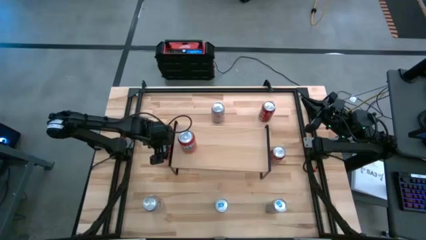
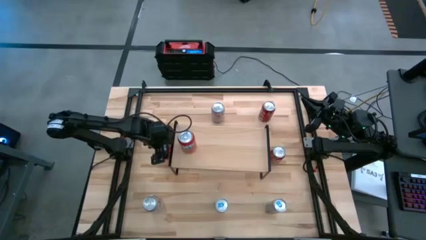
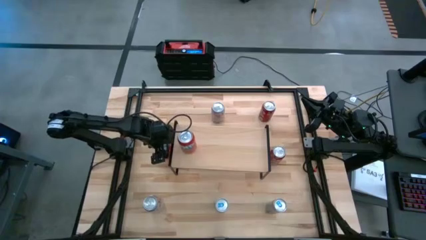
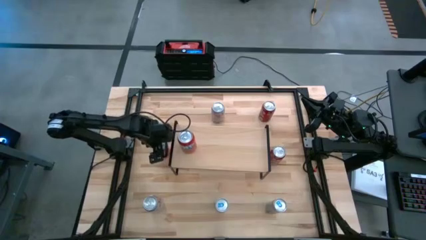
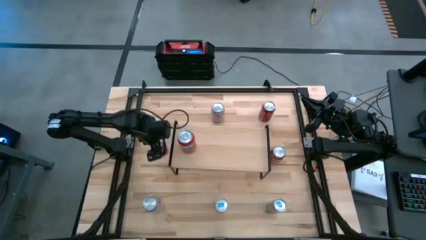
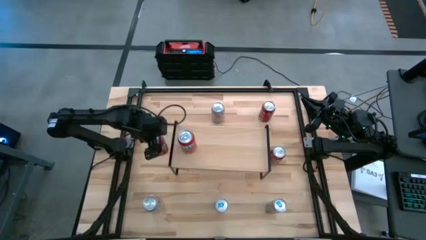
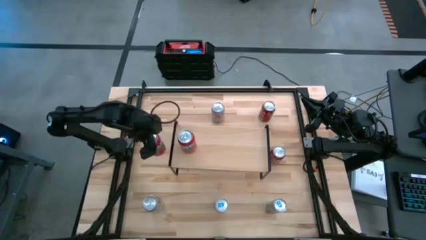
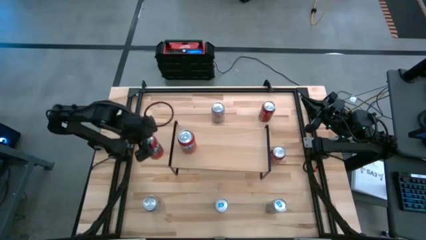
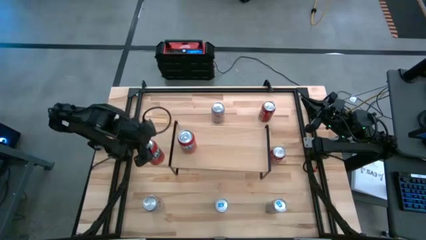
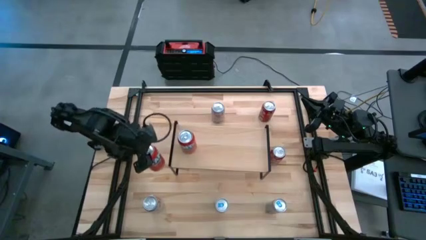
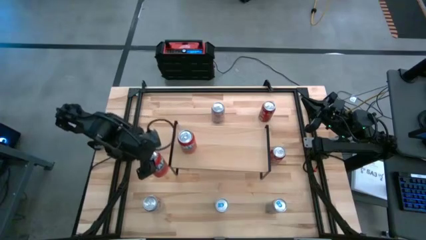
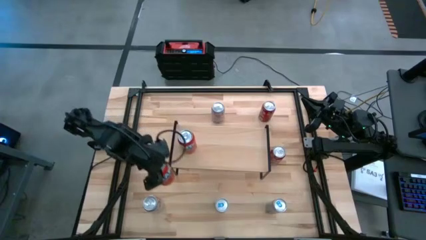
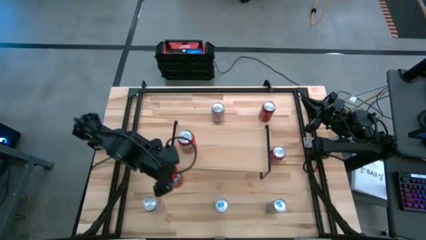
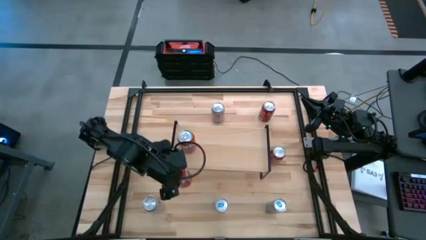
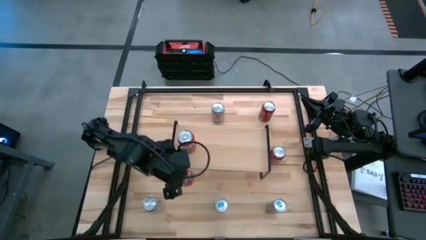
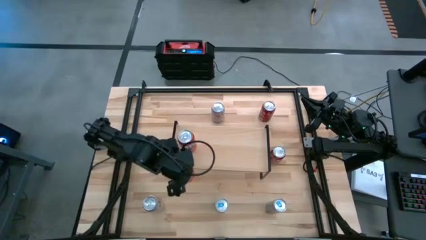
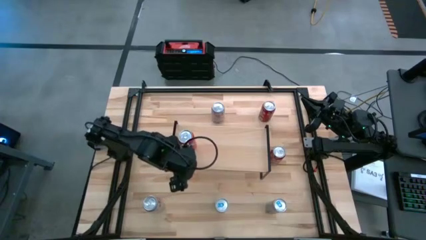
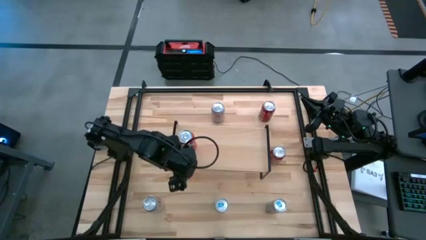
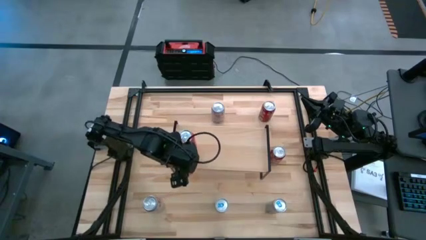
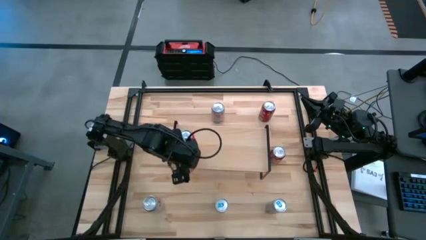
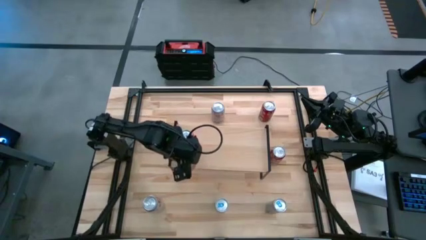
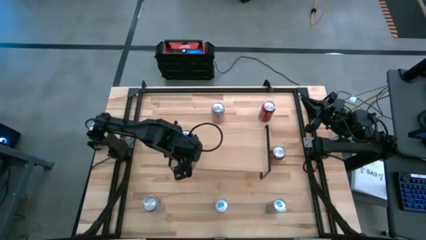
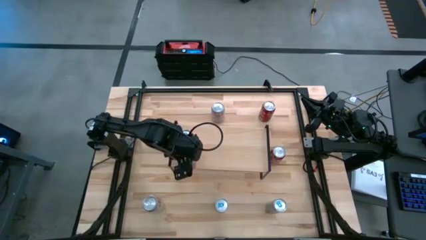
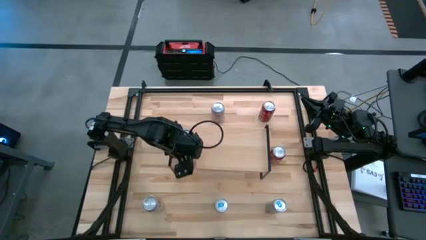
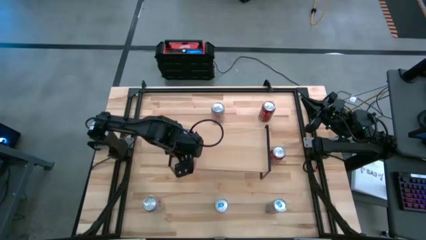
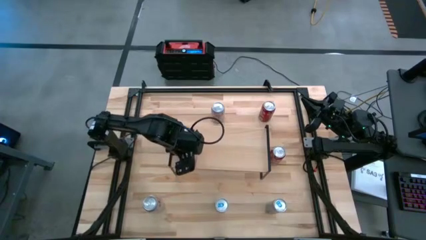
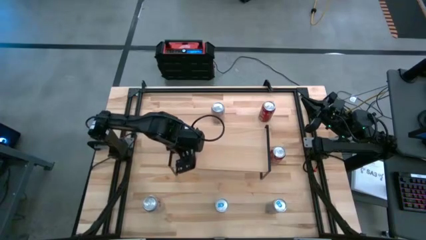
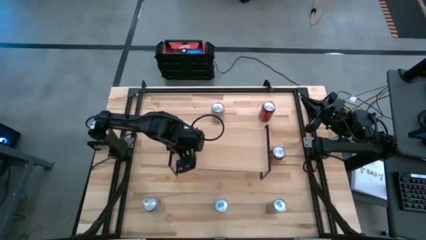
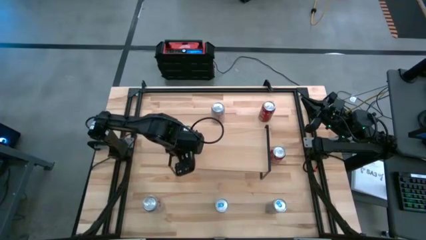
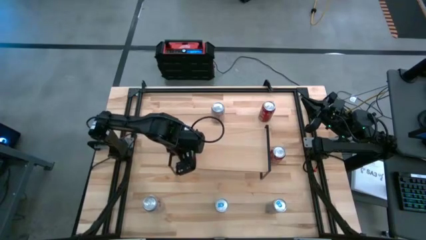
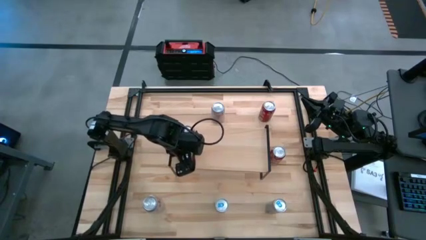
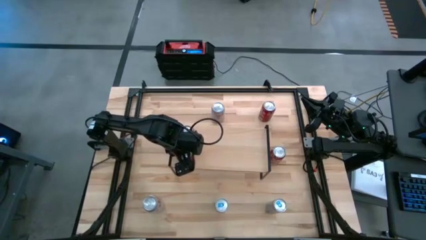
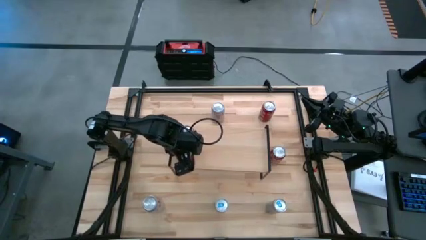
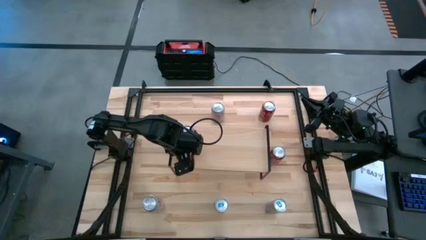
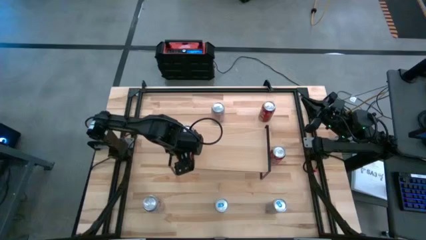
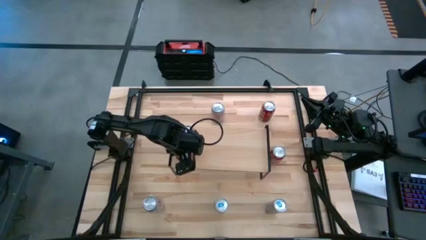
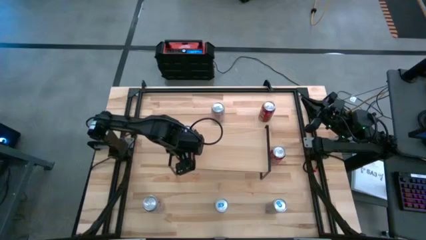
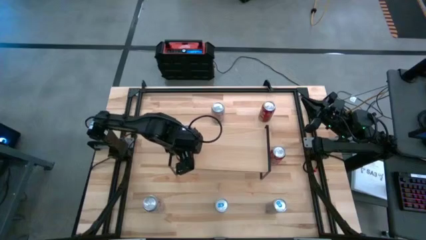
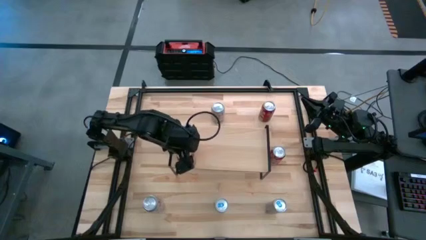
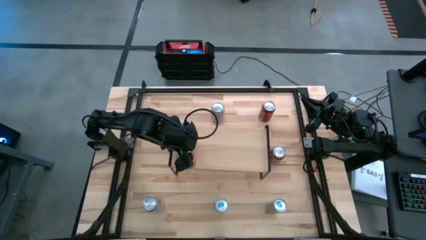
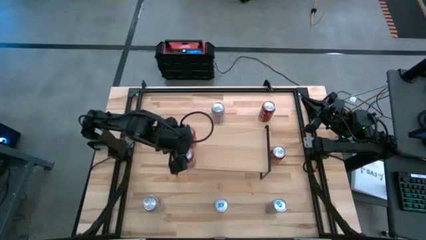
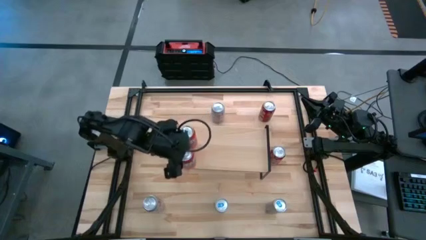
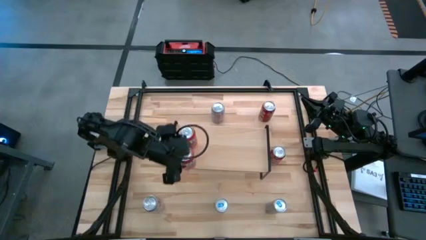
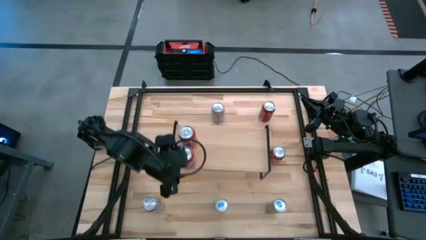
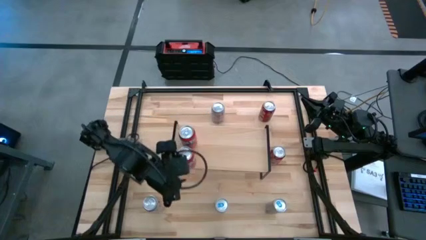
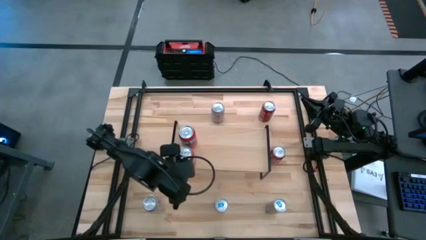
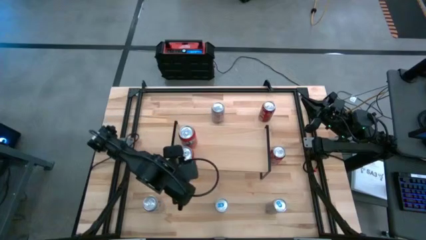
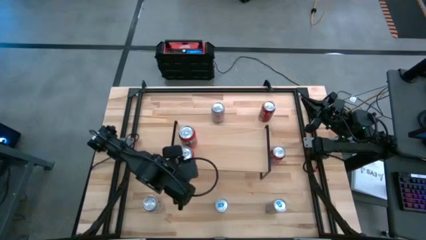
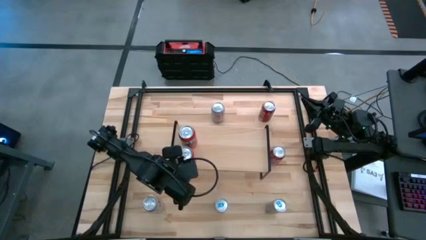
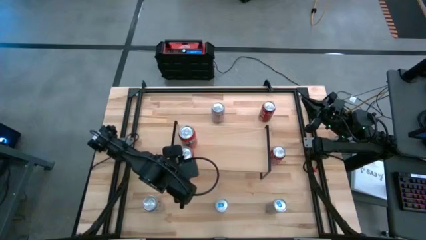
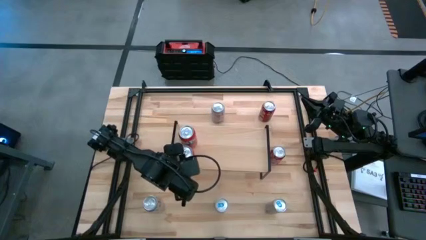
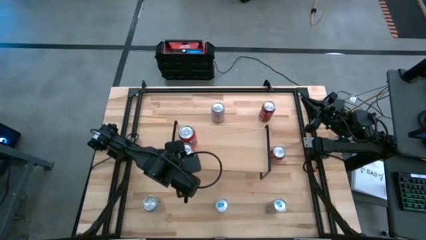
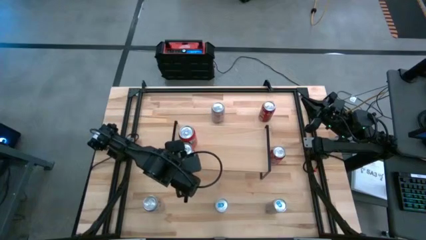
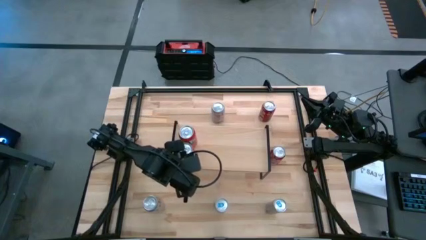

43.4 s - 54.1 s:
Task: Place canned beverage on shelf
Put the orange soda can on the shelf

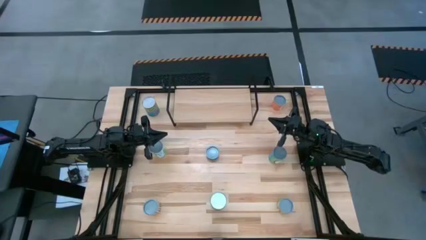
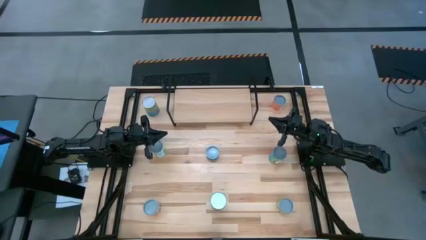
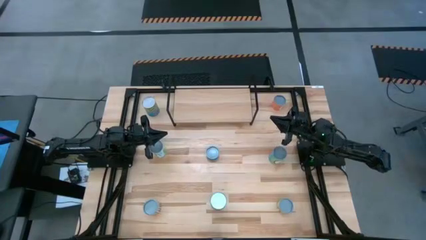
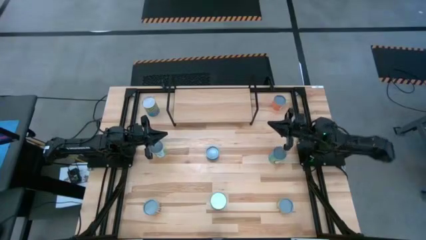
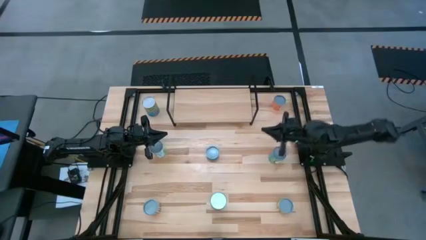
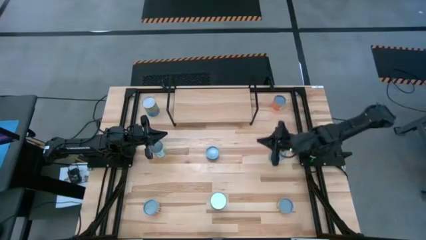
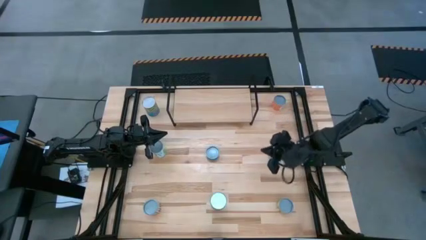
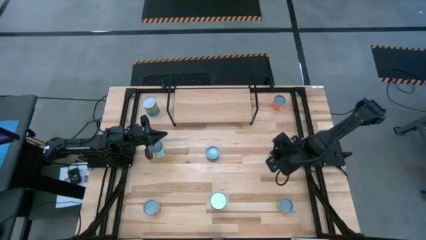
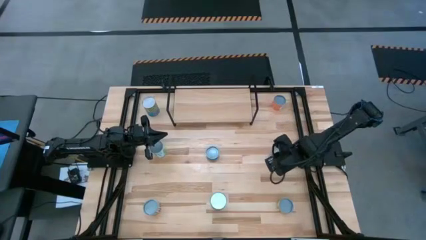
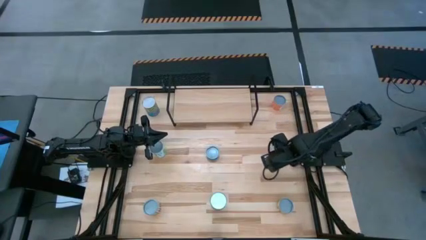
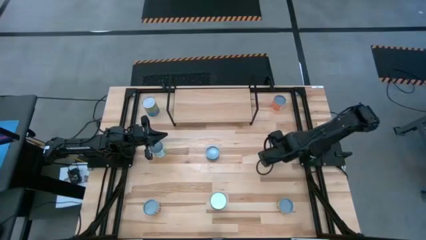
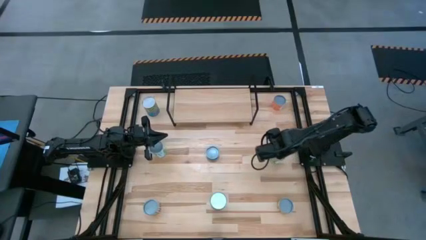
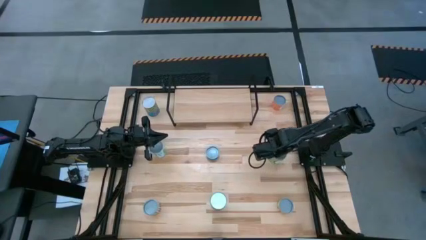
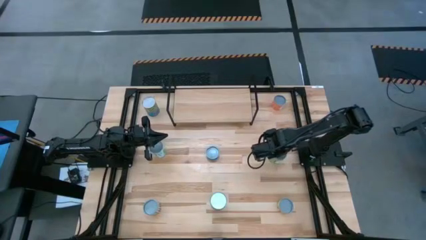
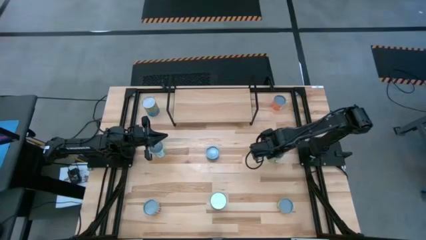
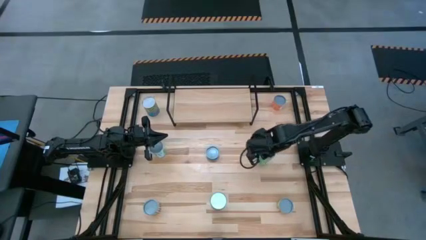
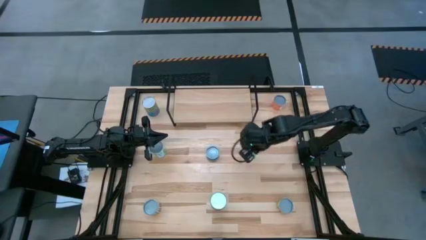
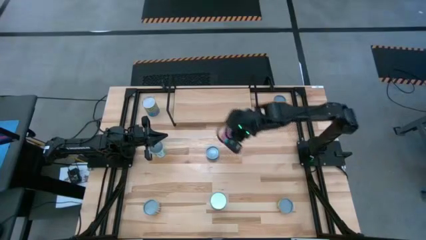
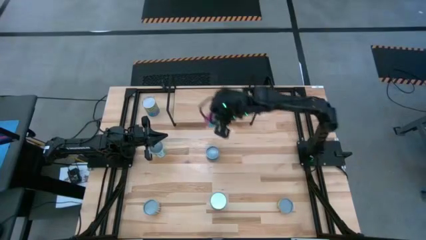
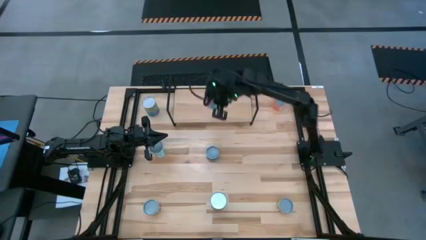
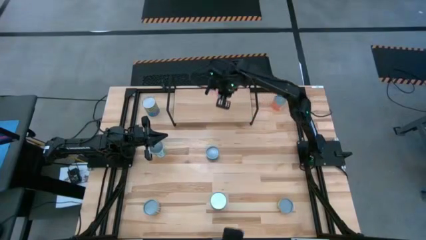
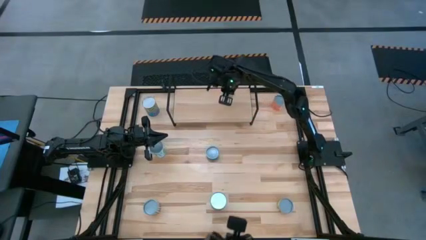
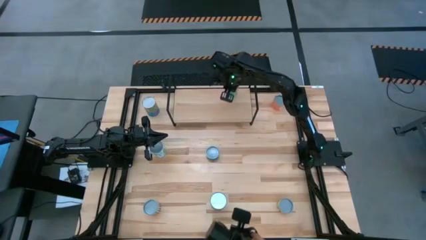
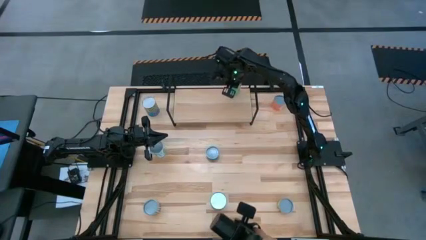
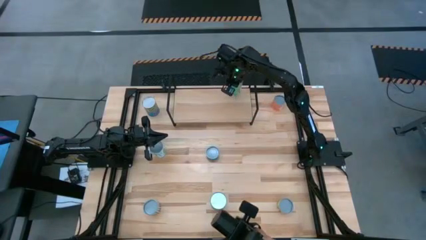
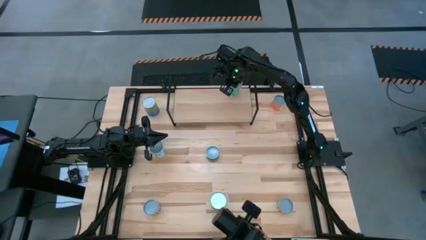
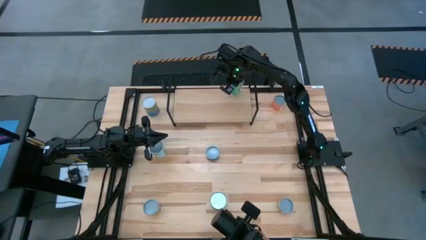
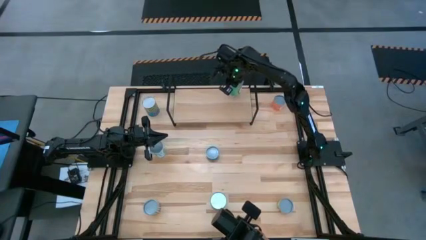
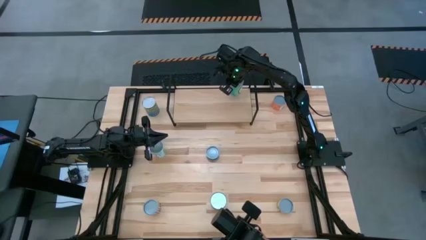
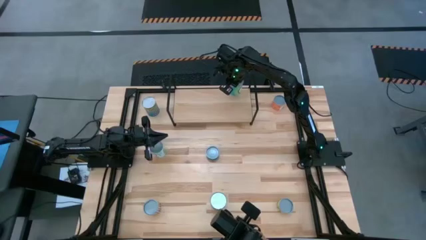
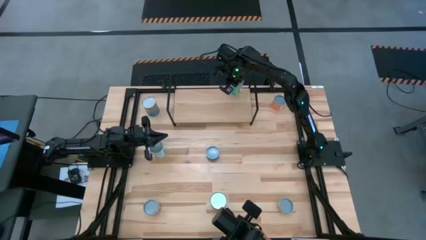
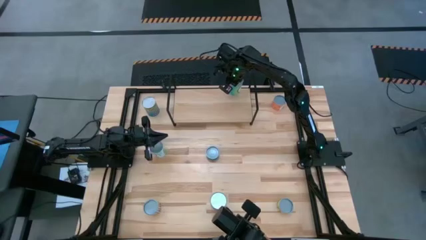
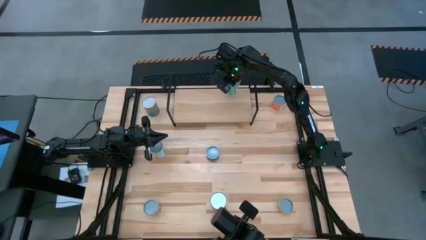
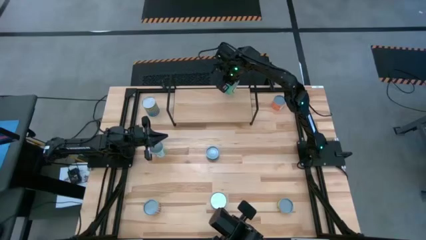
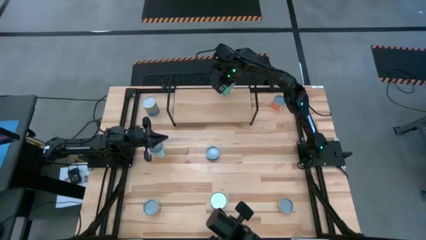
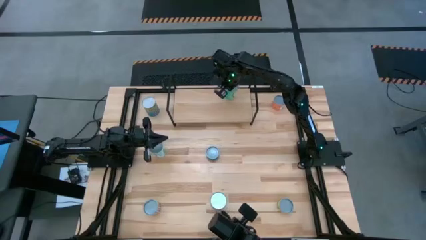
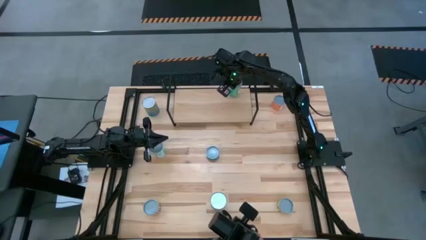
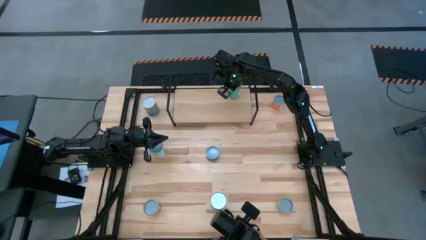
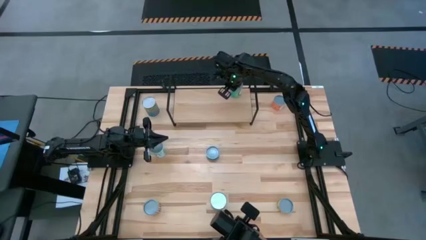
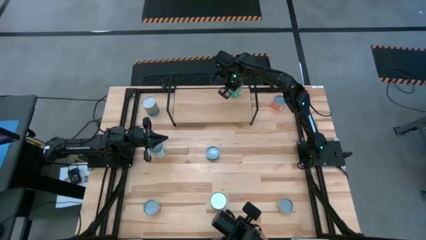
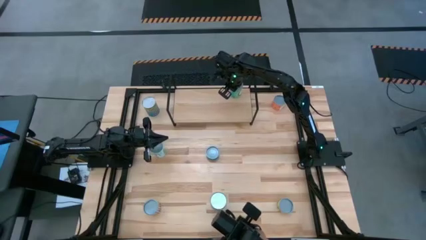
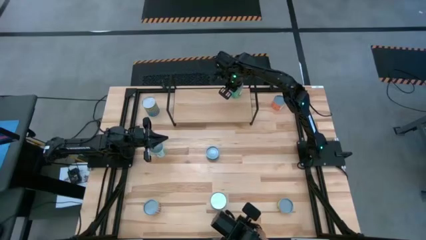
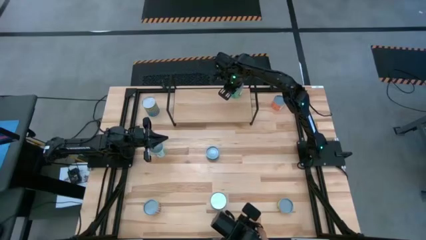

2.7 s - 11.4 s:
Task: Pick and place cans onto a shelf
Put the canned mixed fruits on the shelf
